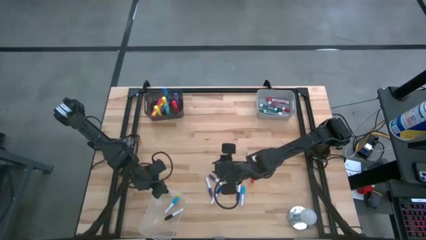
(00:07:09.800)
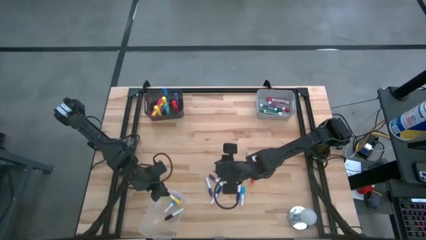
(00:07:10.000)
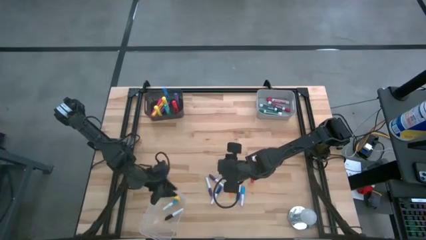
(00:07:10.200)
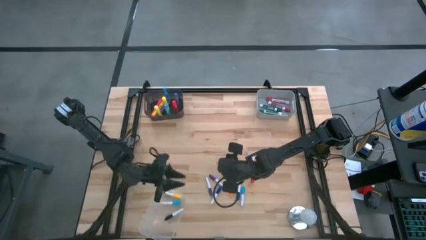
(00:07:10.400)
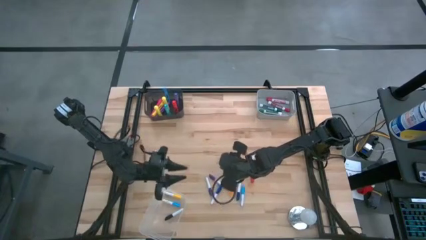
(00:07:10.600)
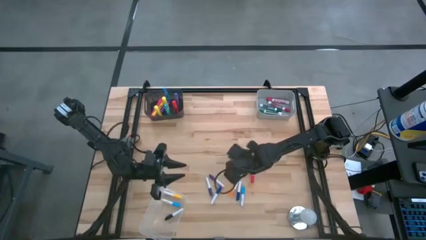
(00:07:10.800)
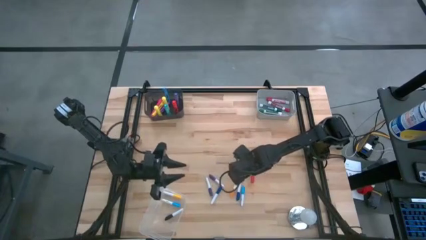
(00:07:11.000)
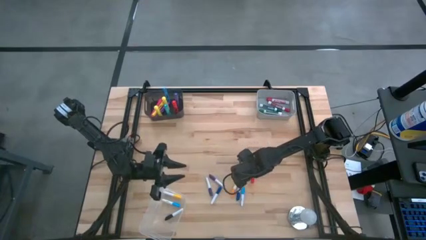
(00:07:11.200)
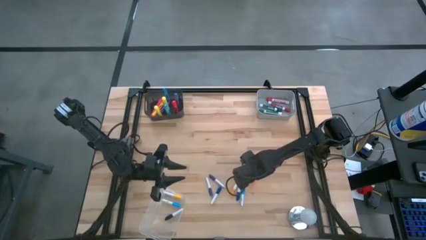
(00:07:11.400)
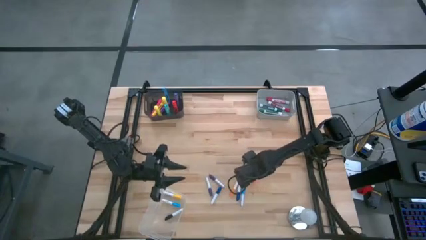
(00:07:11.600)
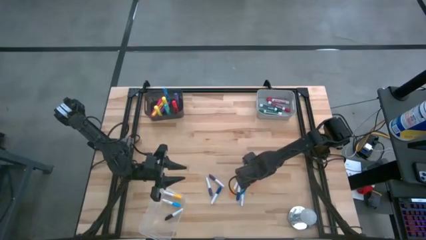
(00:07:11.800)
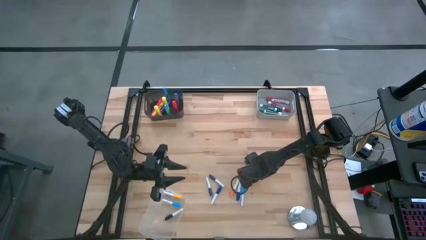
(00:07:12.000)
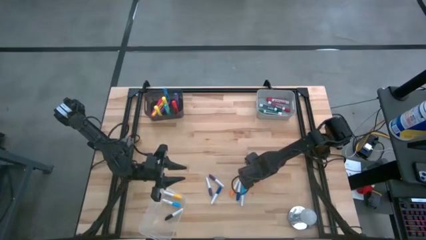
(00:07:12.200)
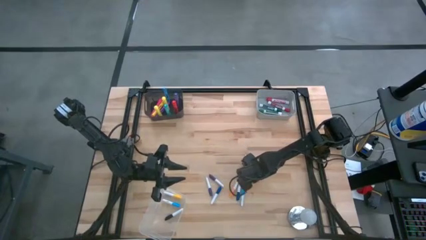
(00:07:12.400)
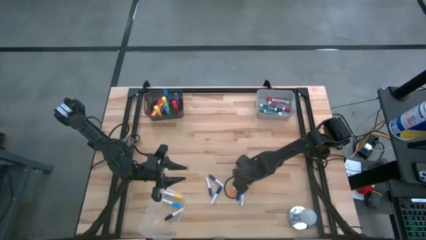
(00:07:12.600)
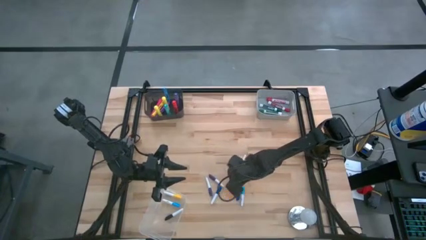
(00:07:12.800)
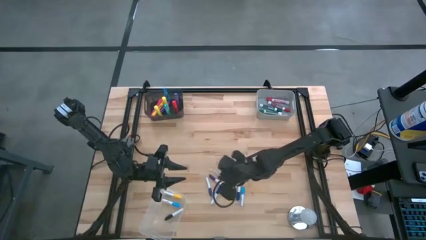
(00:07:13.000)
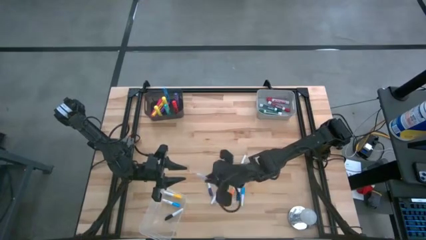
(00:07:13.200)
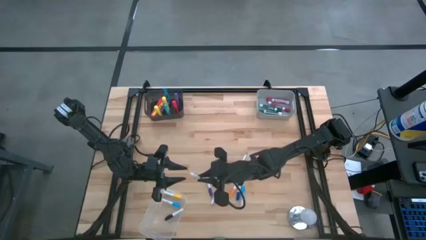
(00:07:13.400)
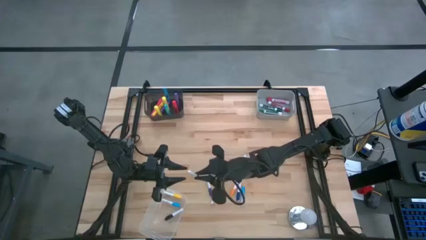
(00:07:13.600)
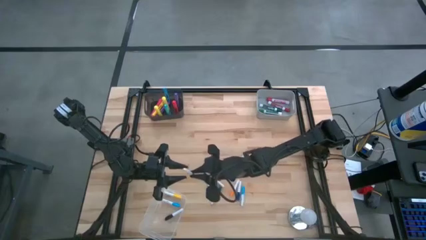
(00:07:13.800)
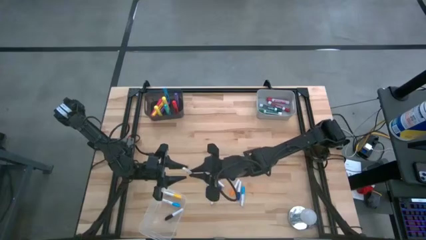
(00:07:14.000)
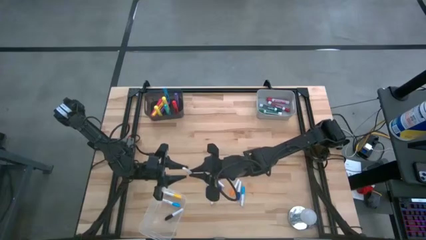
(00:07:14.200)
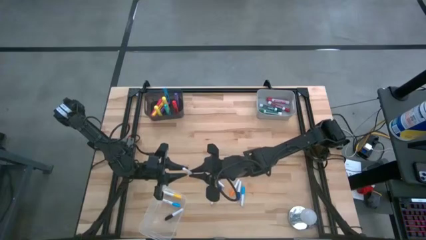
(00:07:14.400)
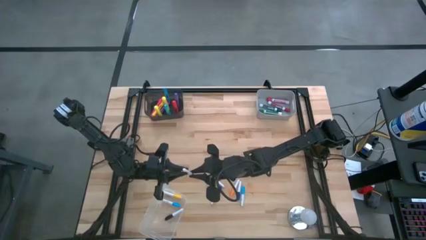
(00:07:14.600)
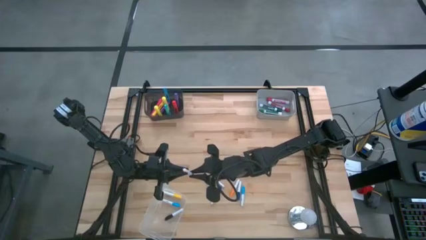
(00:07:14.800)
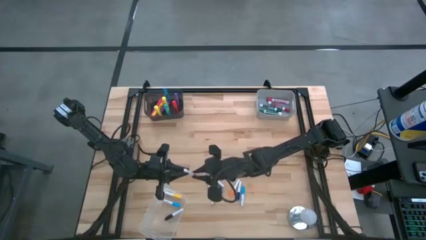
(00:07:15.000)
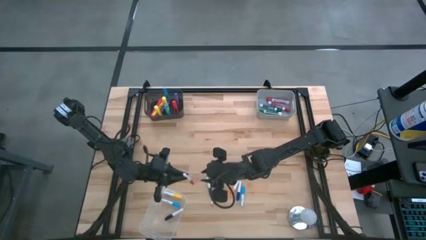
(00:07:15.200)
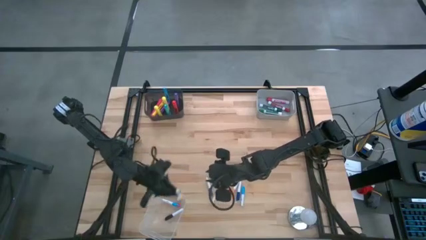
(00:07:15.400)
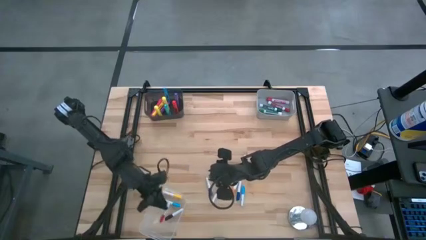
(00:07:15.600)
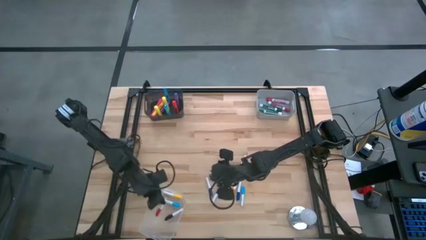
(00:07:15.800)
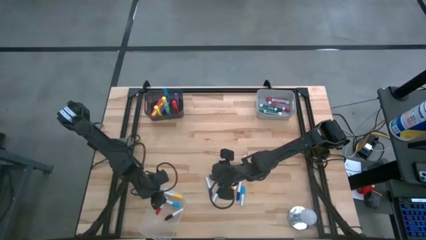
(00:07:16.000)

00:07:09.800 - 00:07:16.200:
Task: Pick & Place Markers
Put the red and white highlighter pen into the transparent bin

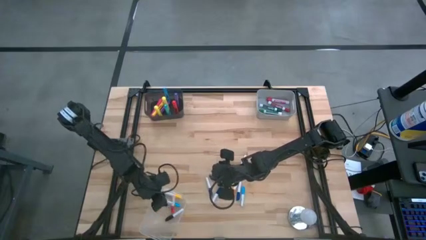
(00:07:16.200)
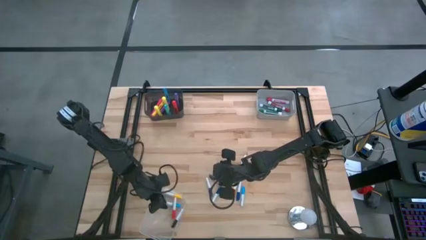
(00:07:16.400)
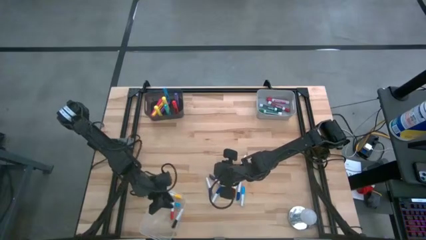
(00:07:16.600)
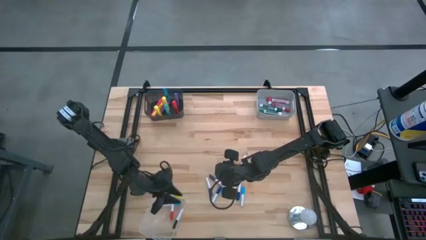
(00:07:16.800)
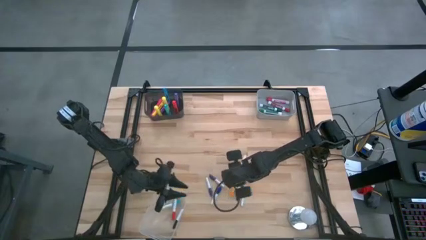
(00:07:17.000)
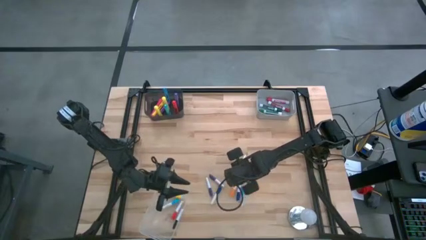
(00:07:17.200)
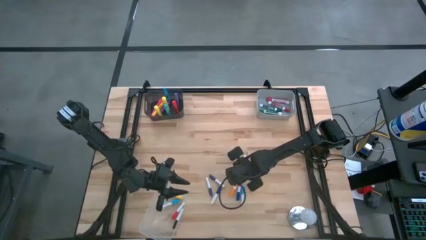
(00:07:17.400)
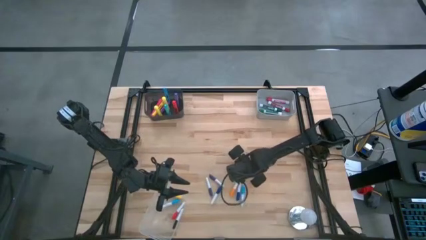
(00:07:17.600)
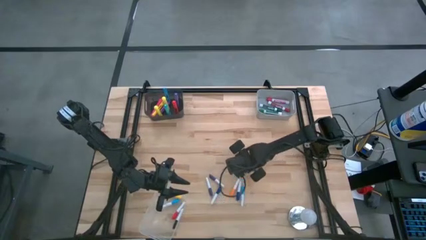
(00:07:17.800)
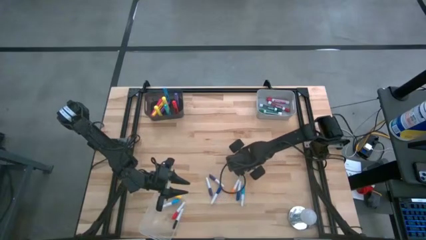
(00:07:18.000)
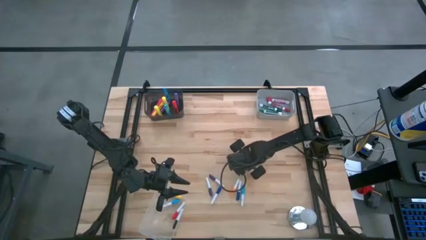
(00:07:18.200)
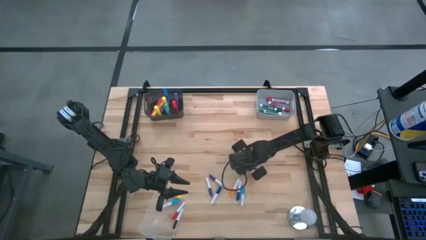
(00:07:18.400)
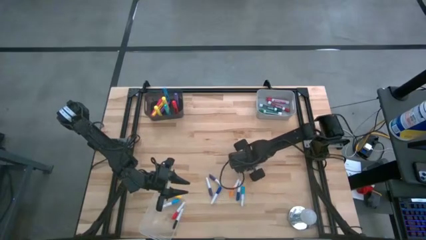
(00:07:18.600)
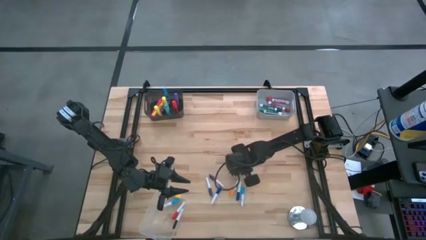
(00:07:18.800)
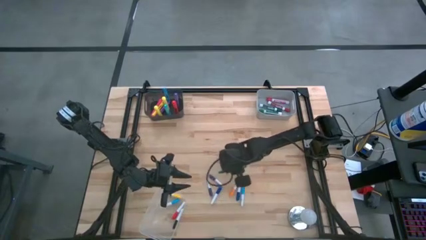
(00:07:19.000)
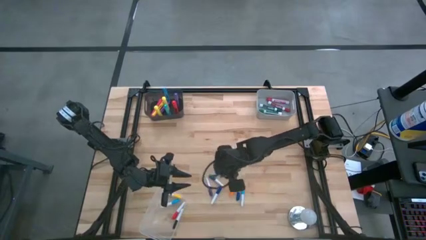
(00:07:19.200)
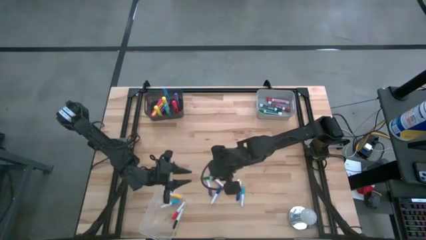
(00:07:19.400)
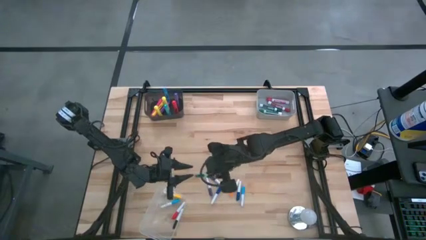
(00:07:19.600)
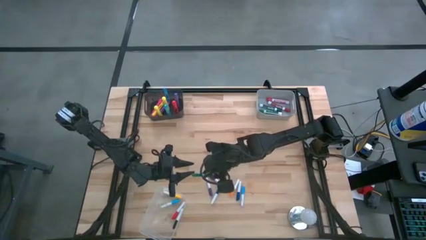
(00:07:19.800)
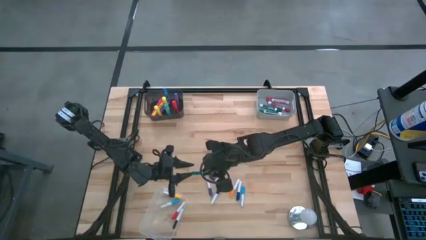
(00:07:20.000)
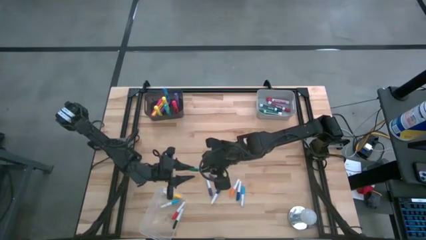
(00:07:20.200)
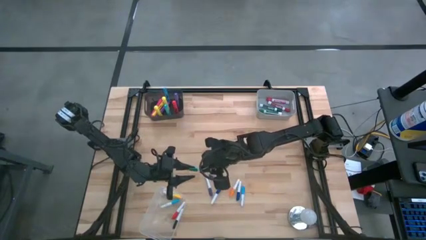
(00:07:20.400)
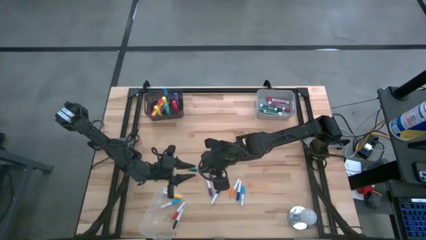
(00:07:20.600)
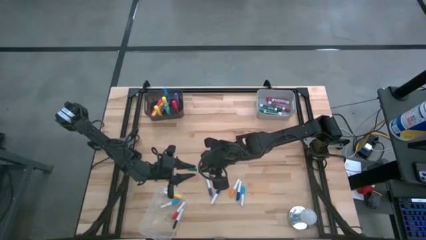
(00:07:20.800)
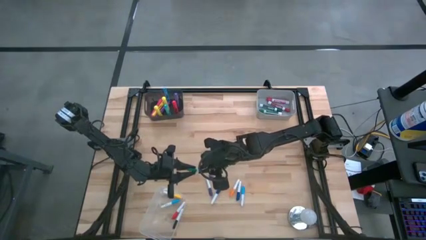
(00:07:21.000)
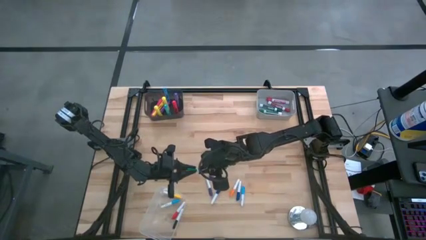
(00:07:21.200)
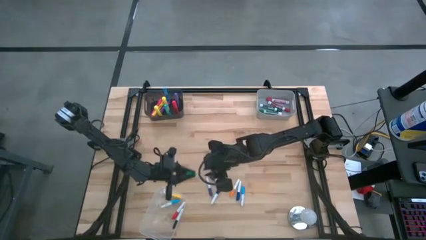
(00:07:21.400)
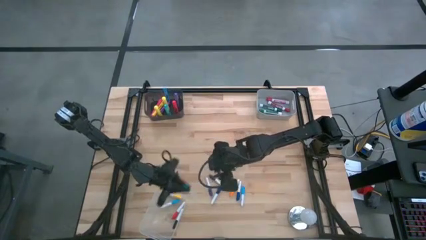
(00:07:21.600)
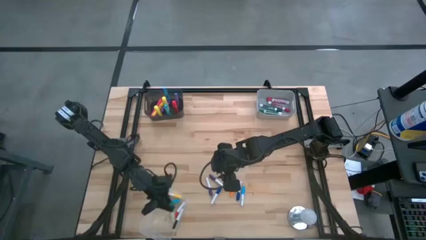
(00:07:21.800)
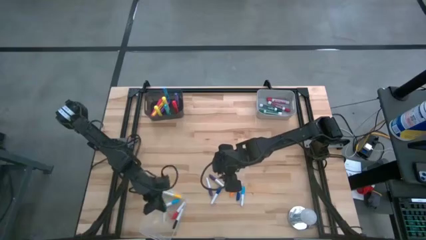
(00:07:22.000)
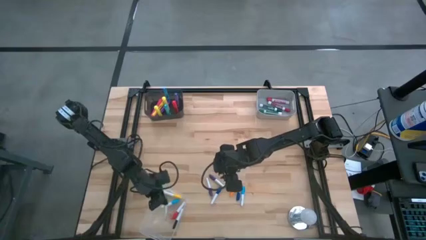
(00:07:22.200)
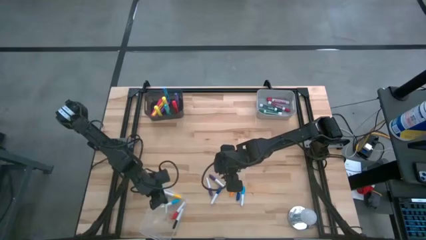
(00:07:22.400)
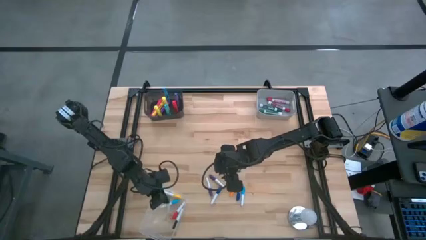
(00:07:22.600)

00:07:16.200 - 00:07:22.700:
Put the green and white highlighter pen into the transparent bin

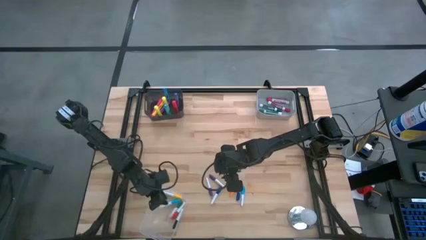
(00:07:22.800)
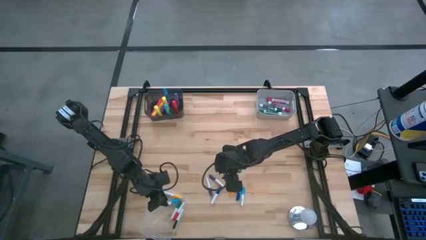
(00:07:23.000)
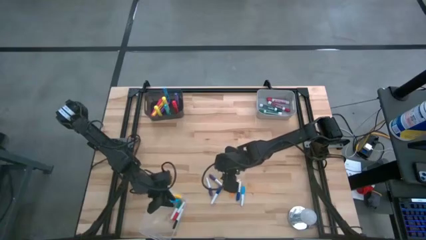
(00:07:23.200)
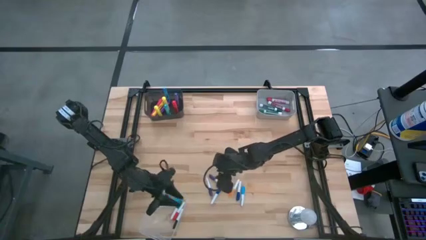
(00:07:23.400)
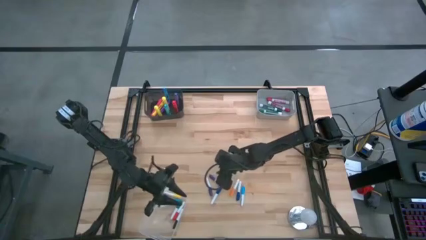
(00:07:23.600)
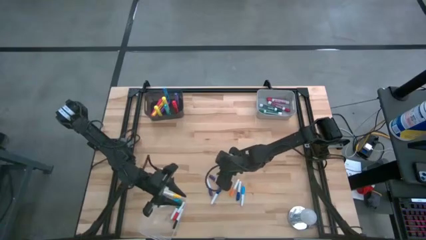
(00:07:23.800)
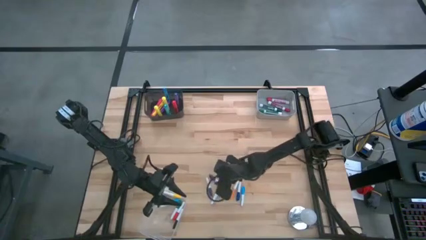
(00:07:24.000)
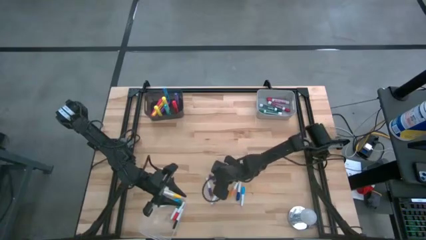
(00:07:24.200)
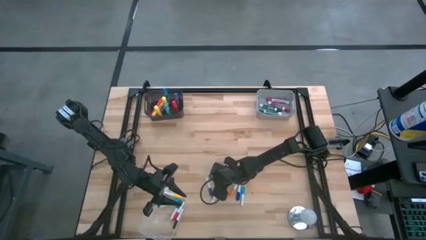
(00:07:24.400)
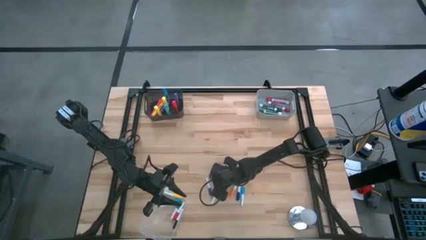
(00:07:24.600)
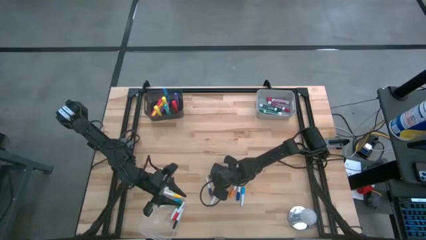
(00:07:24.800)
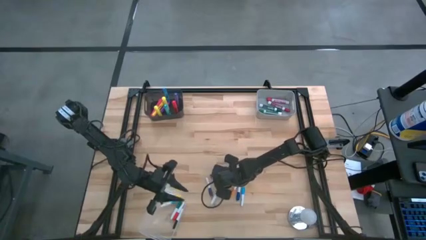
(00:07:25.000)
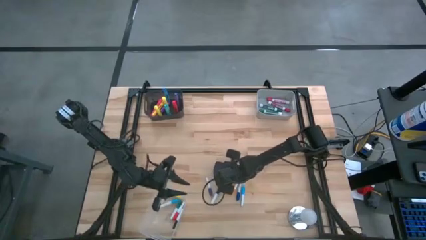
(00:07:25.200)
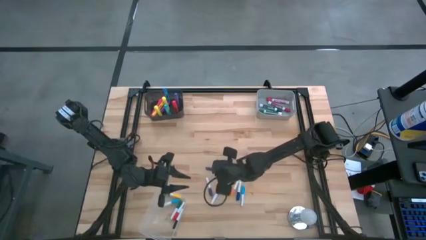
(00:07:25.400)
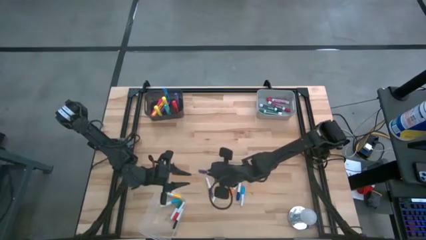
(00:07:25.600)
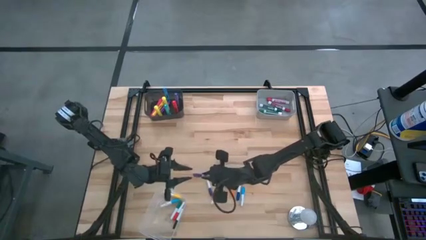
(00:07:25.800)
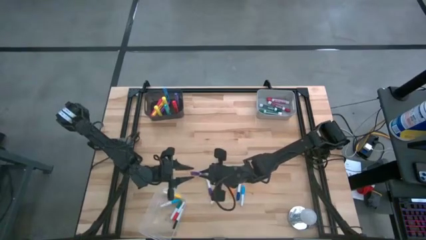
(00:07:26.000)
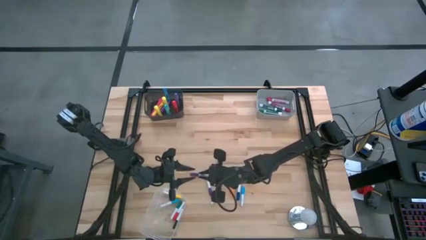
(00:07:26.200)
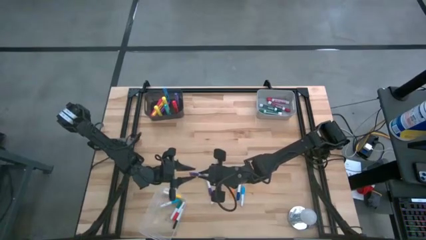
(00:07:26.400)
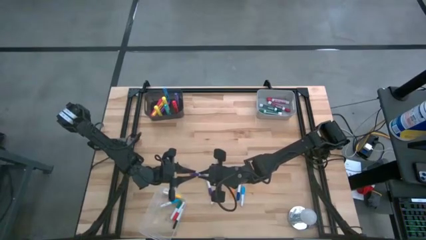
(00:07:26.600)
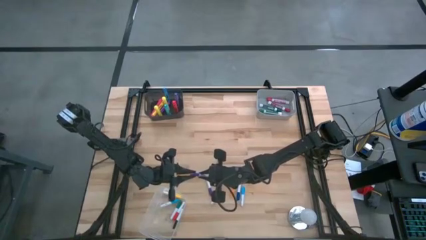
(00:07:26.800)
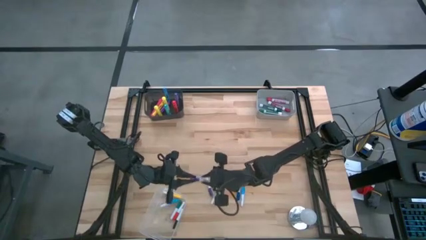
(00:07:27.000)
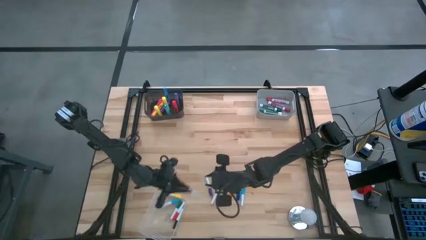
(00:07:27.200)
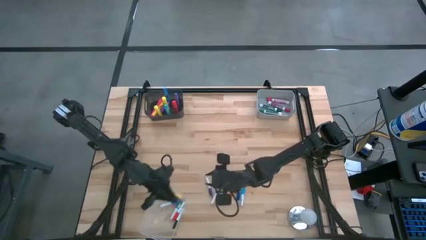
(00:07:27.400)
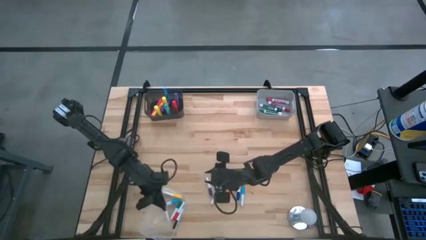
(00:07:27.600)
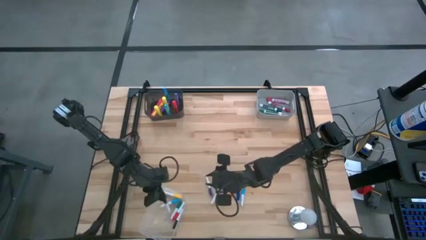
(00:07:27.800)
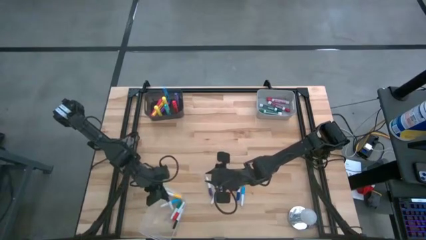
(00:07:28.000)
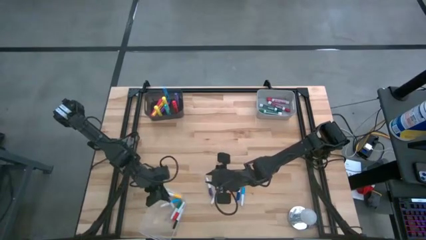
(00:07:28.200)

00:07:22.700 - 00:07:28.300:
Put the violet and white highlighter pen into the transparent bin
